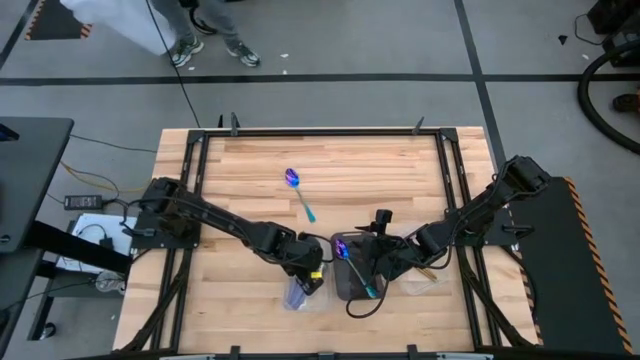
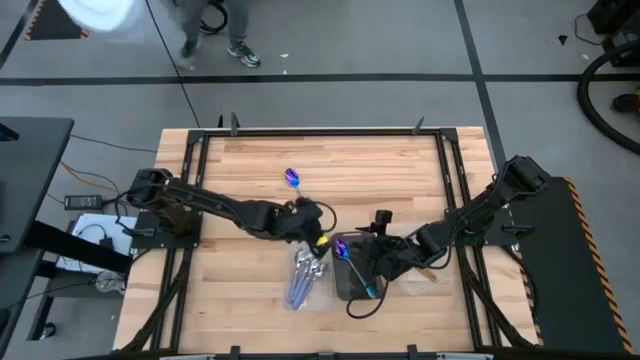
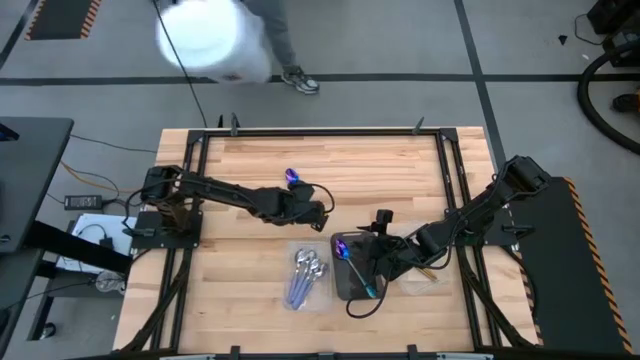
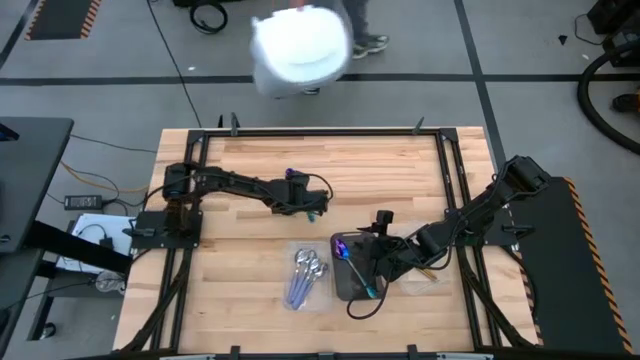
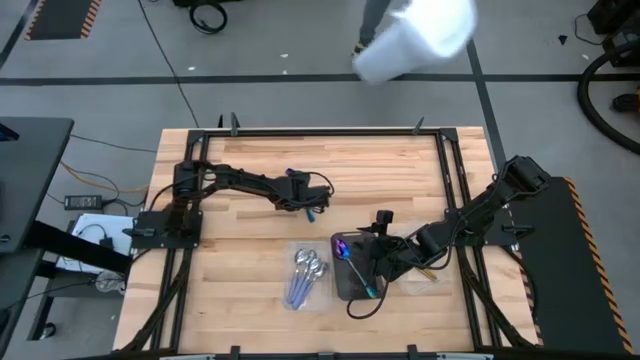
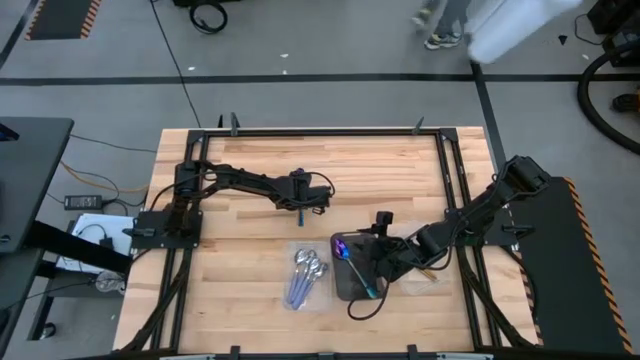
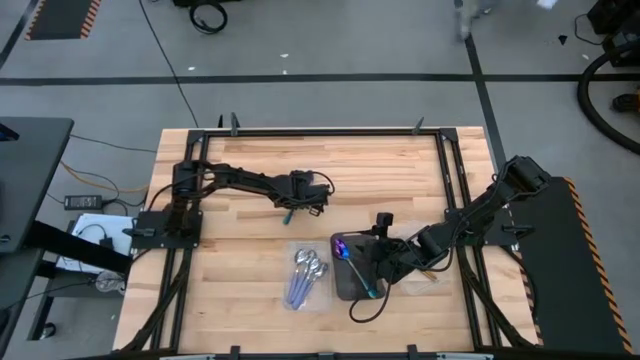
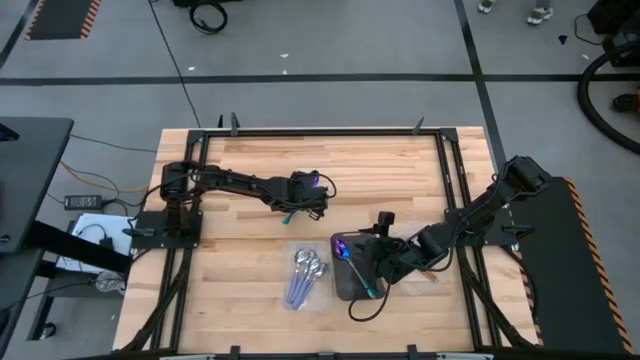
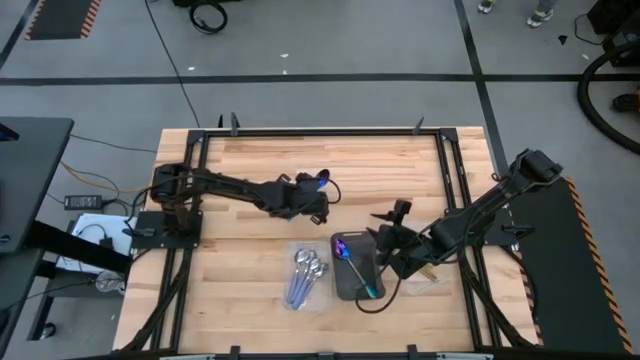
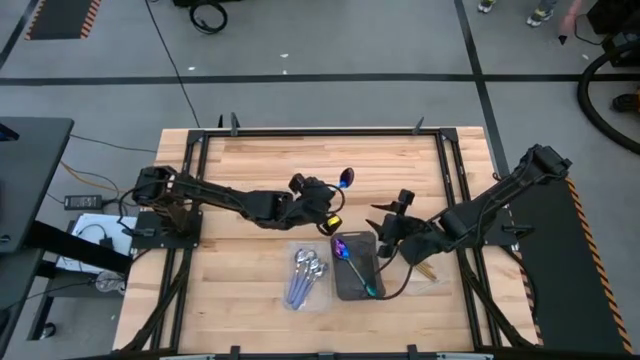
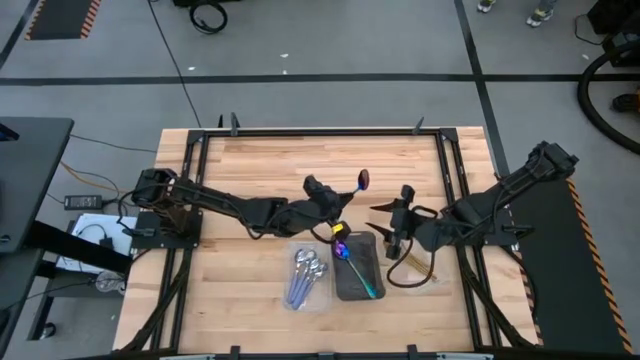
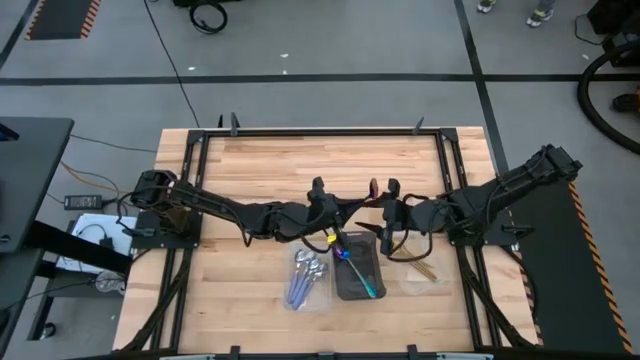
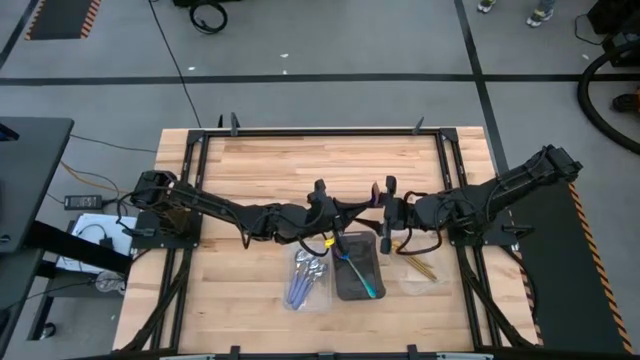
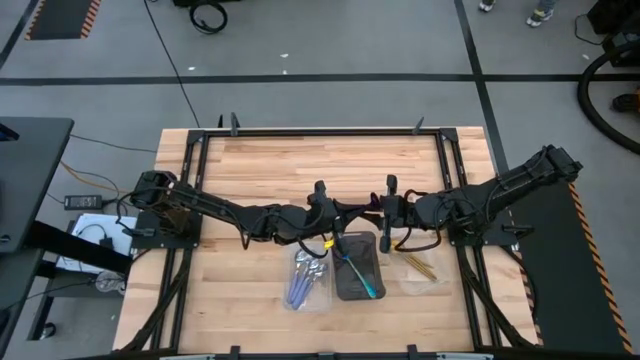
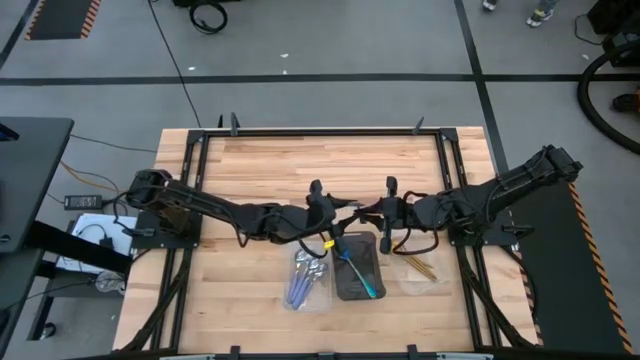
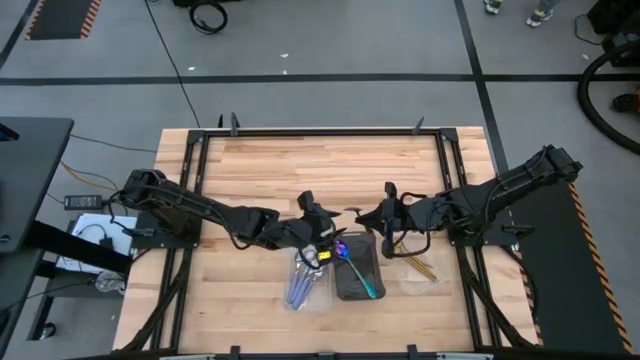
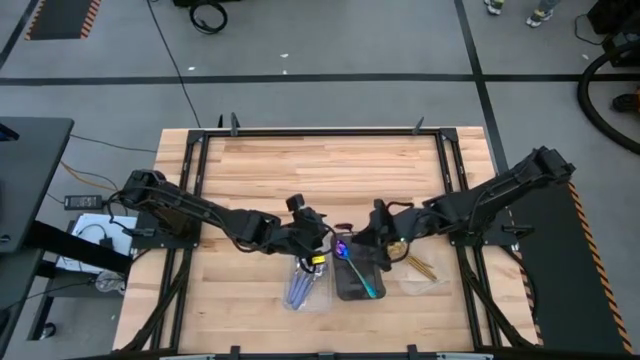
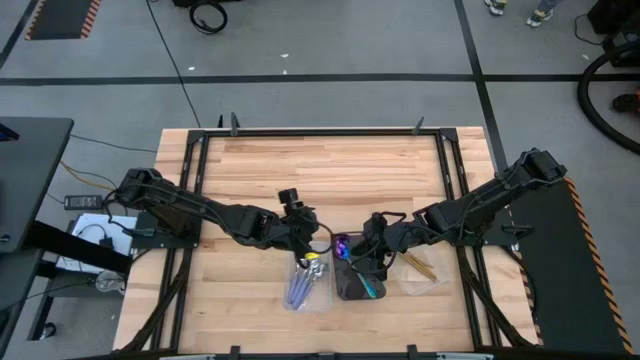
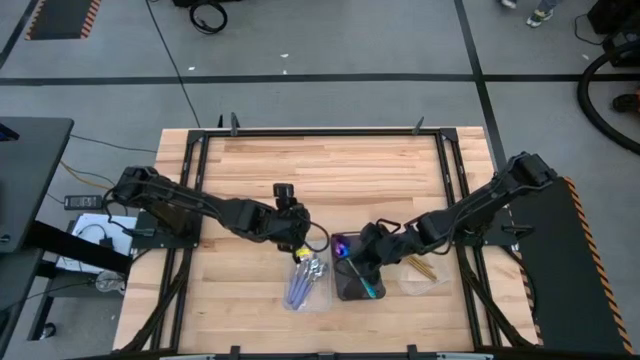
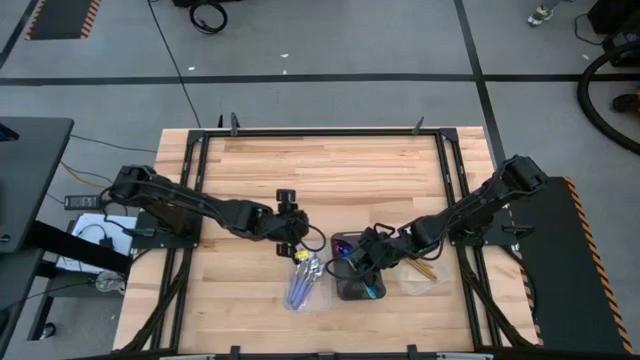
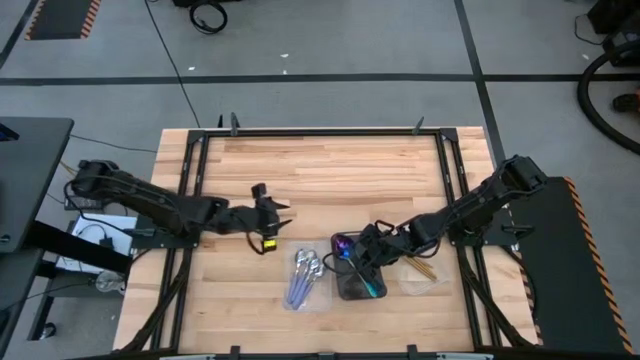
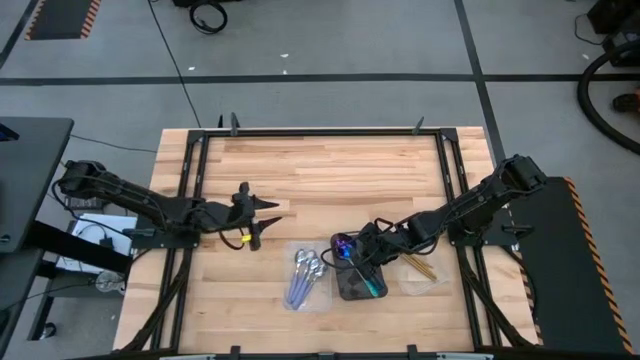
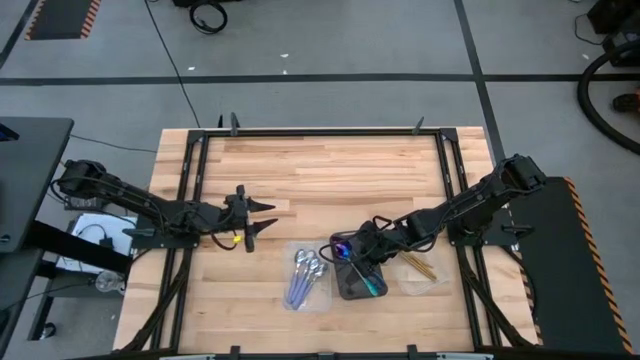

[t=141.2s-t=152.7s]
Task: Sort silverware by color (type)
Put the blue spoon into the black bin

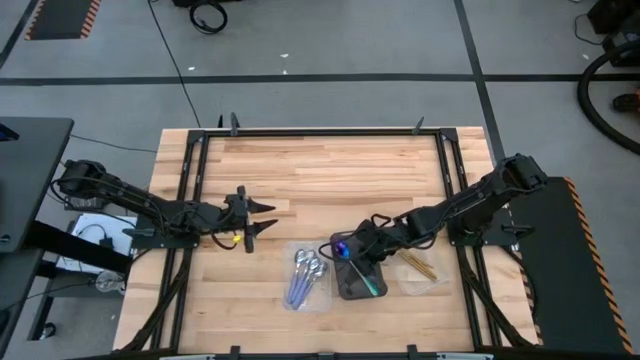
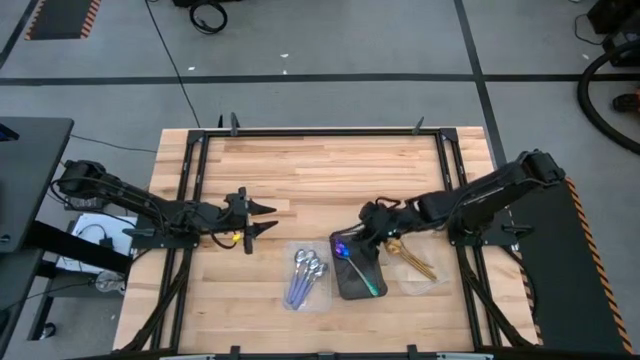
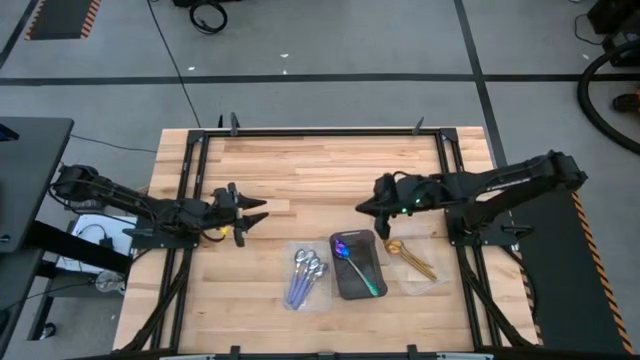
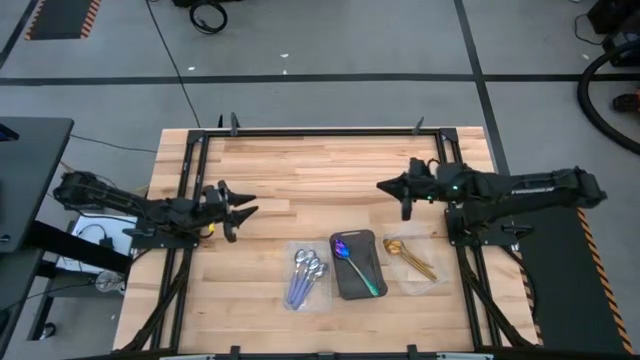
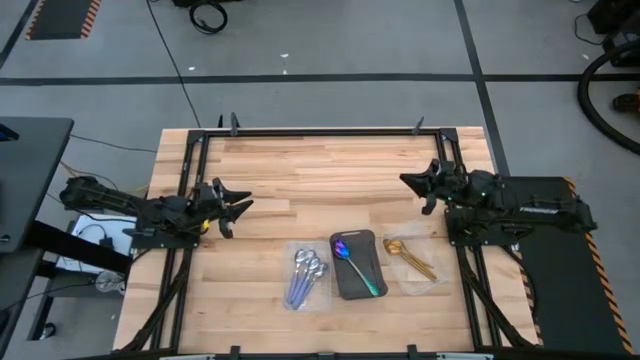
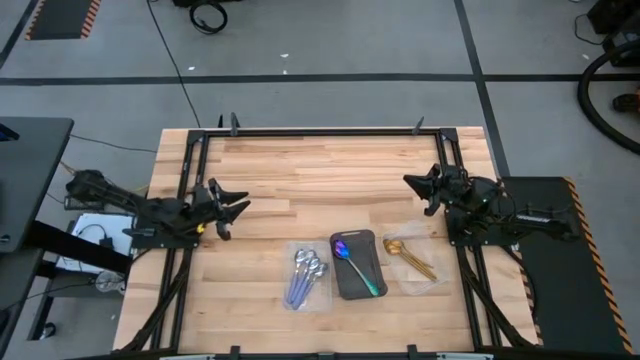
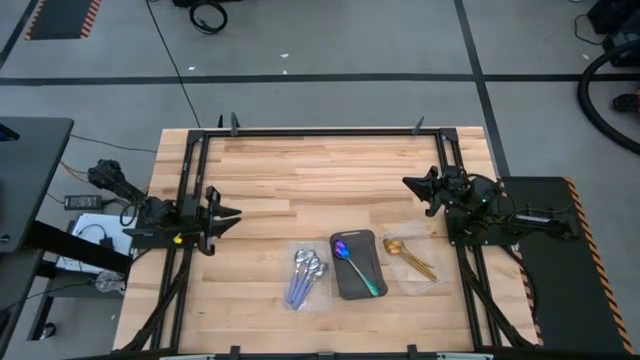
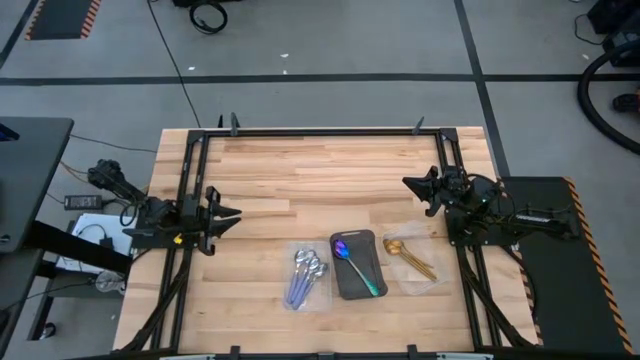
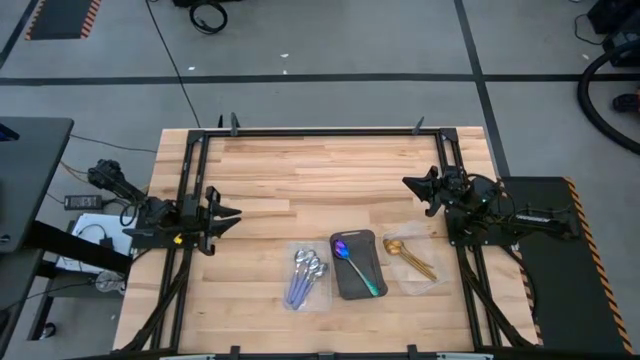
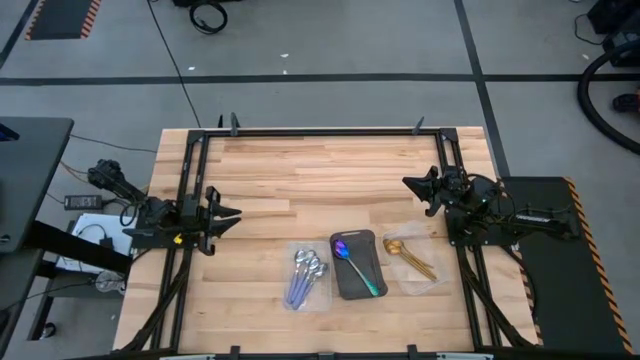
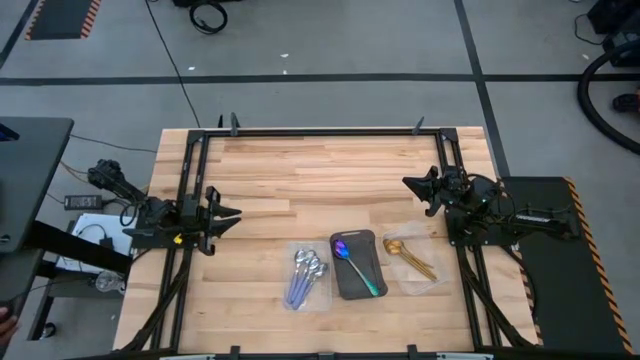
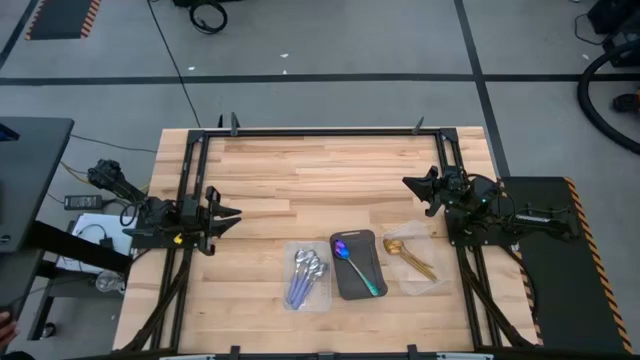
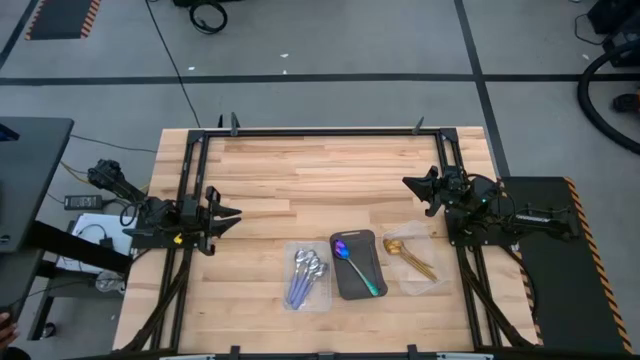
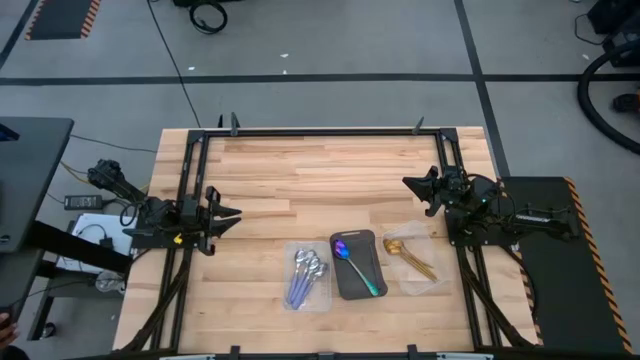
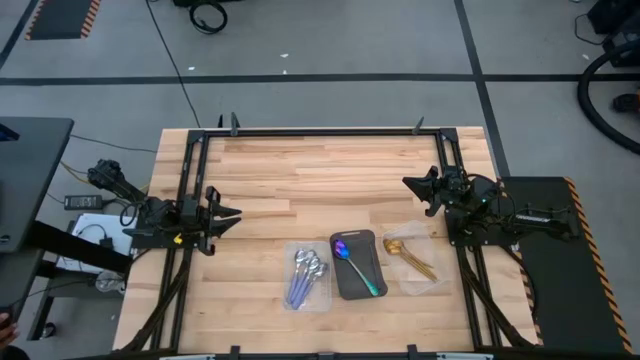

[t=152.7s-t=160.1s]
Return to Home Position

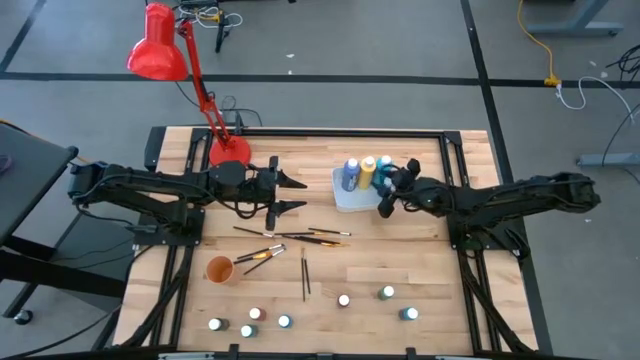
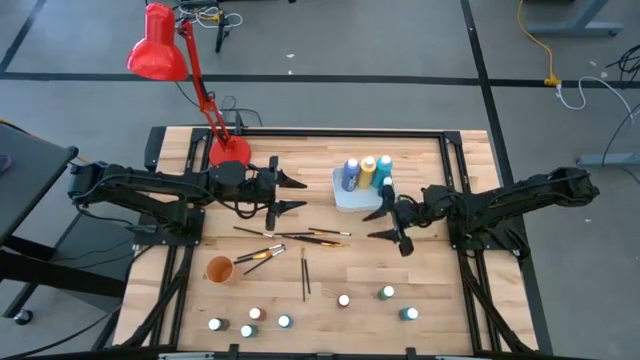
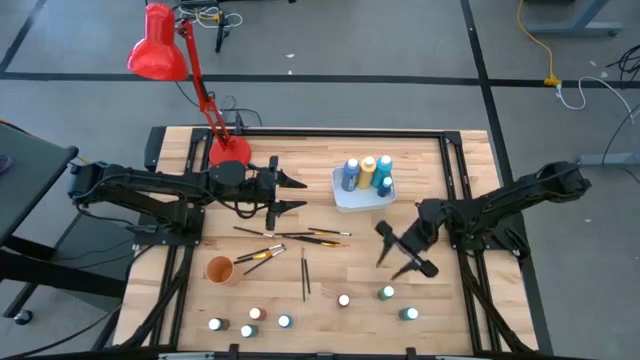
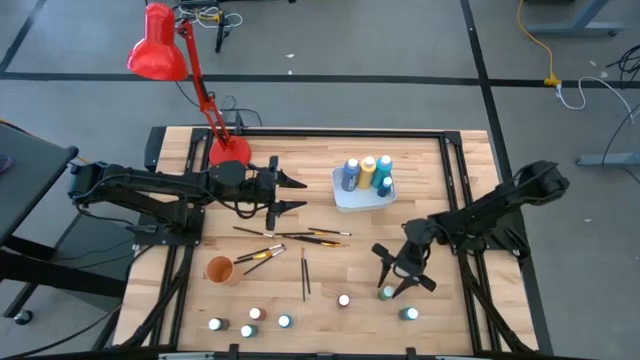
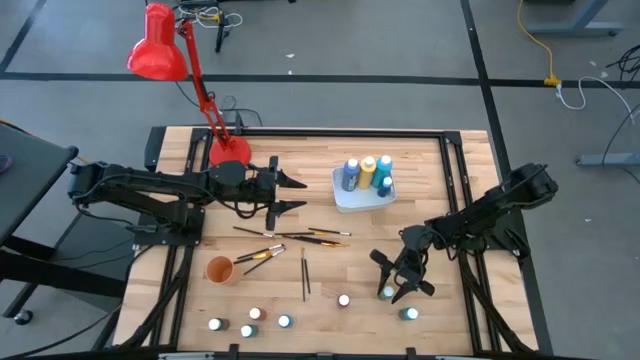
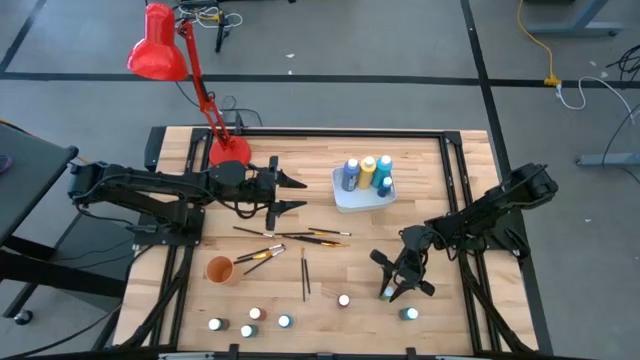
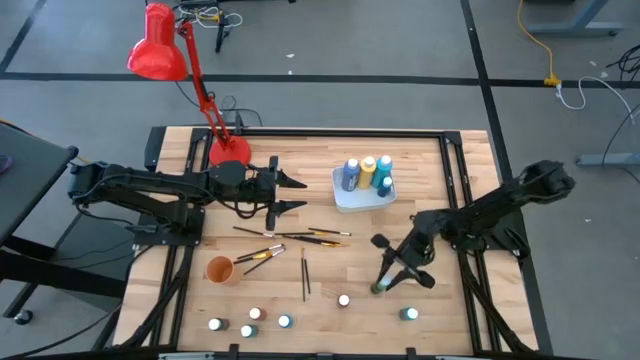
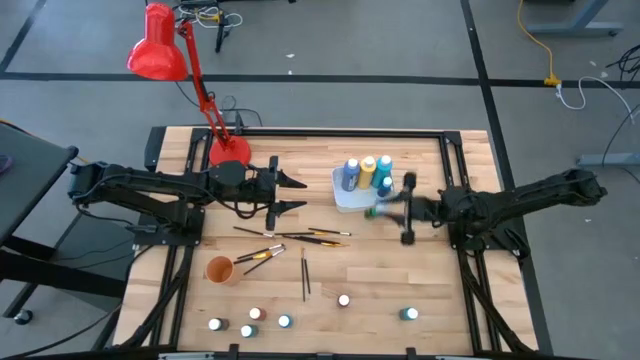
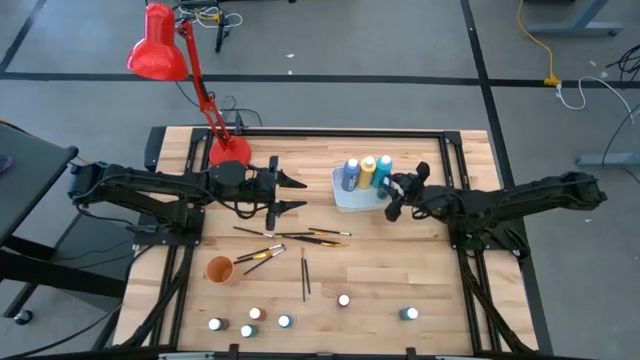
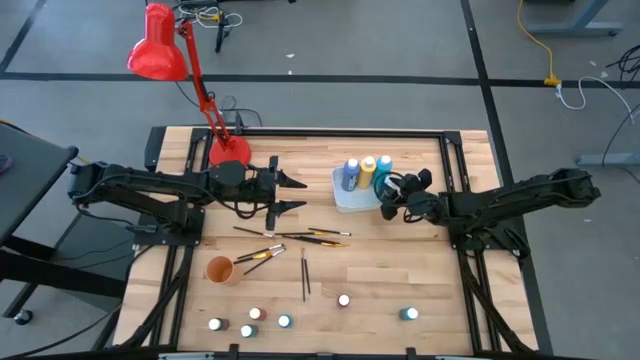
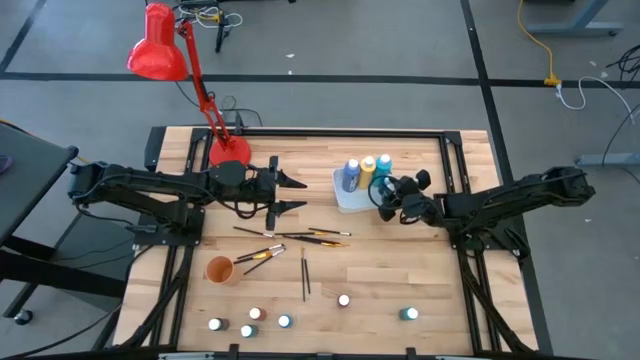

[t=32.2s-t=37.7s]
Task: Pick & Place Paint Supplies
Put the small green paint bottle into the white bin
